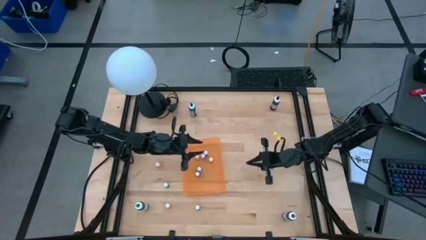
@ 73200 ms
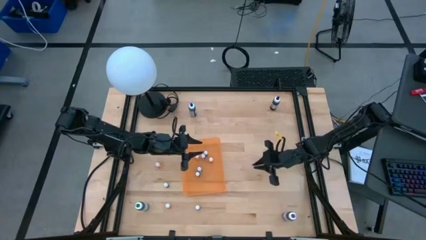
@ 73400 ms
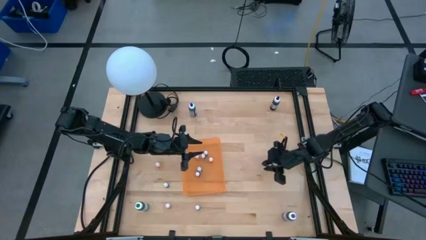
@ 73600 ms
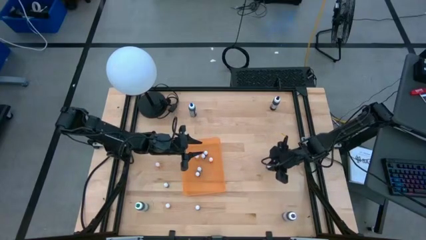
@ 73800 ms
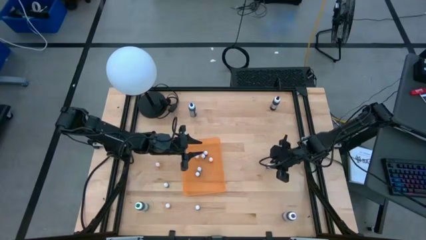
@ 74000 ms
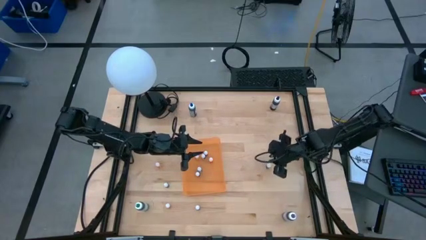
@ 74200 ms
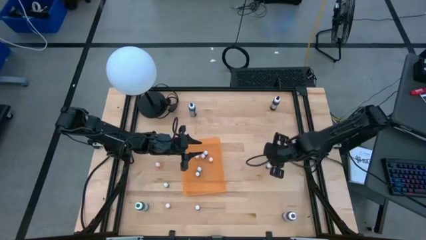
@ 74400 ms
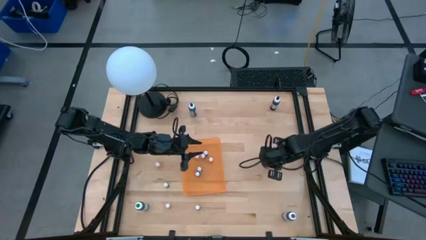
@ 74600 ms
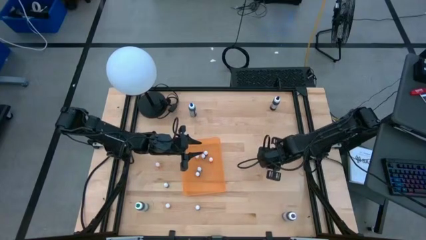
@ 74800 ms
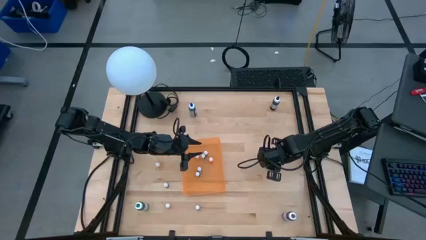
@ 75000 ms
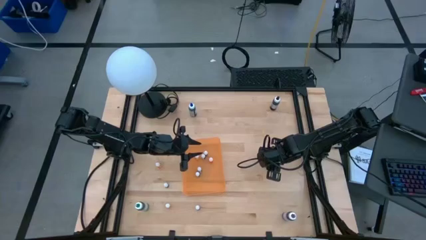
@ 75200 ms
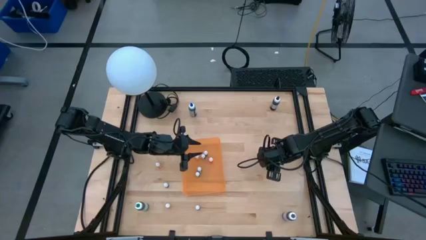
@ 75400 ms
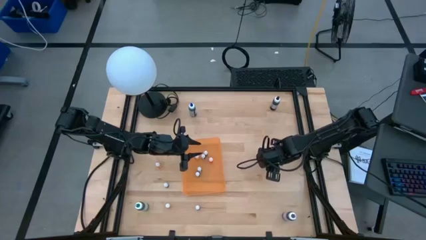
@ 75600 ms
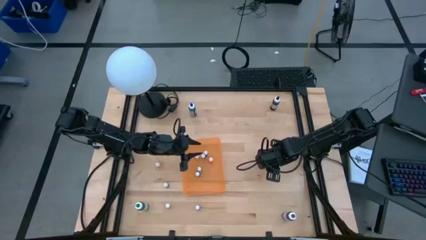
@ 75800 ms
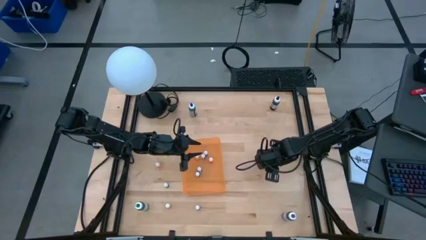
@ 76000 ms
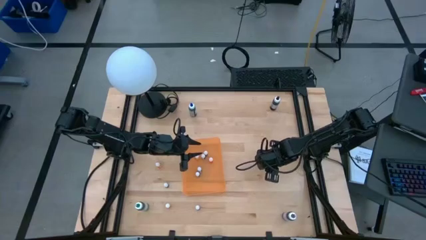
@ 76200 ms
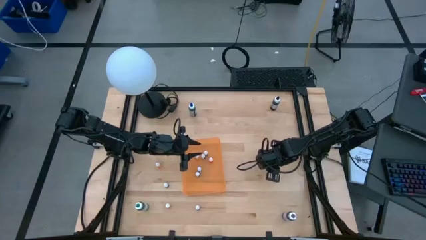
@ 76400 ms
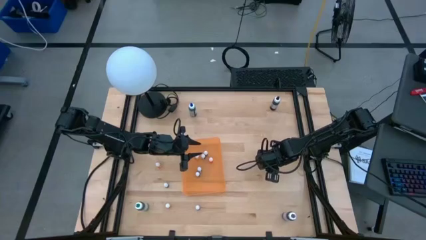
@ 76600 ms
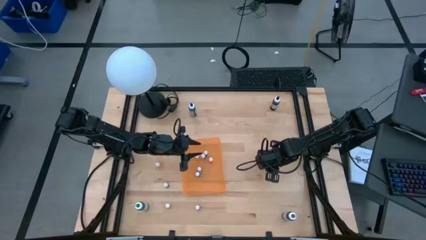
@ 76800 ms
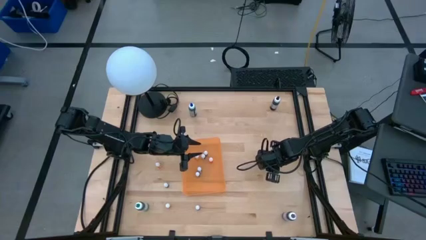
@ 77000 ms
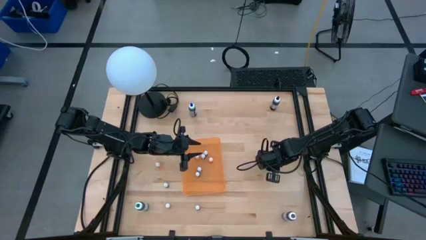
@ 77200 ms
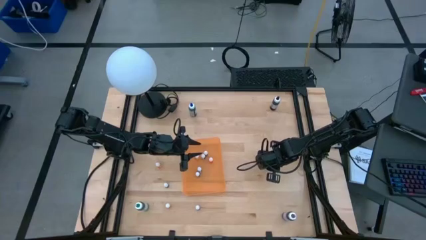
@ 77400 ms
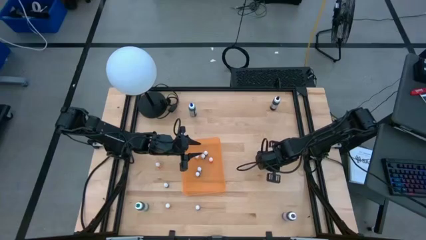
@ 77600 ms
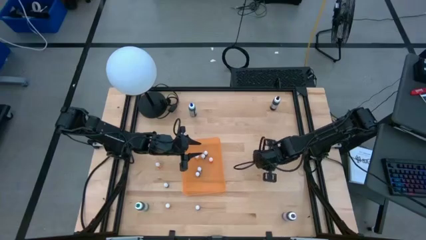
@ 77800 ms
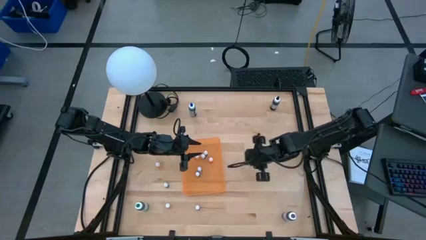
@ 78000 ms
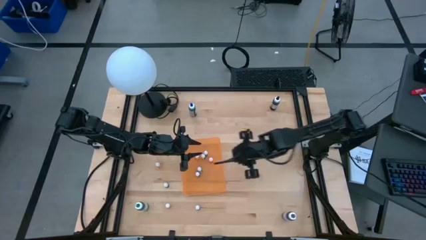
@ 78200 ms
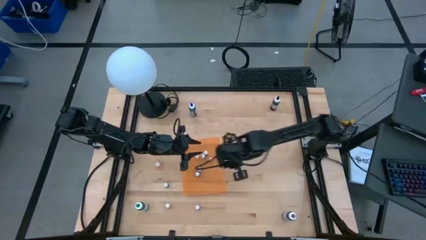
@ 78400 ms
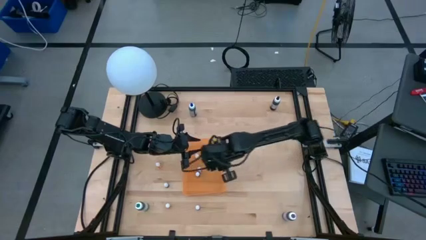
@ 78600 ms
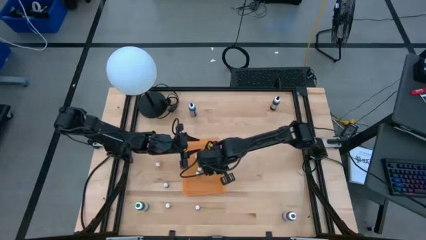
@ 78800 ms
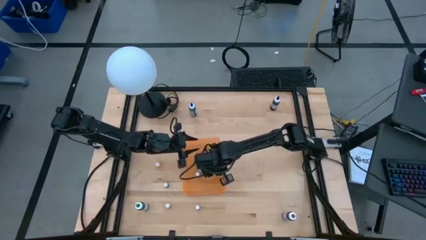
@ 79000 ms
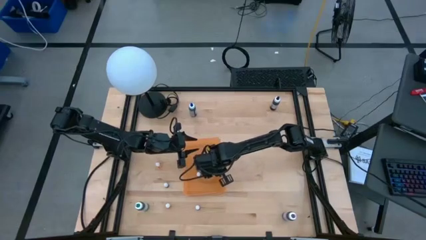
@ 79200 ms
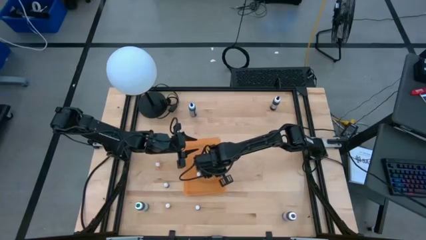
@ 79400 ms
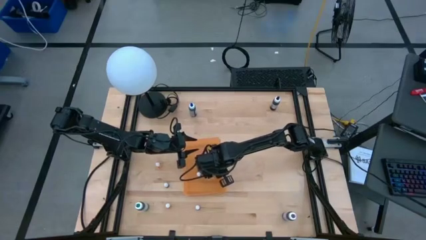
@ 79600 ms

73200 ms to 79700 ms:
Task: Pick & Place food coloring
Put the small dark blue food coloring bottle into the orange bin

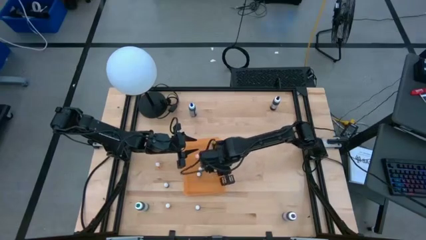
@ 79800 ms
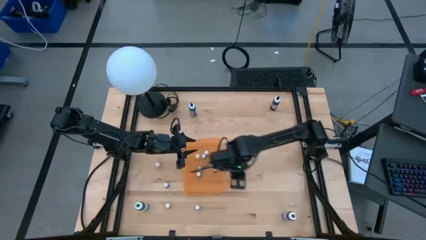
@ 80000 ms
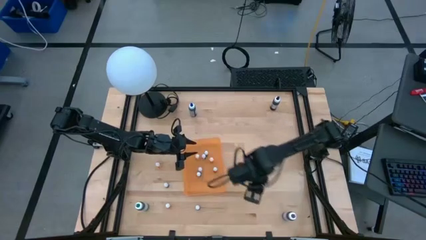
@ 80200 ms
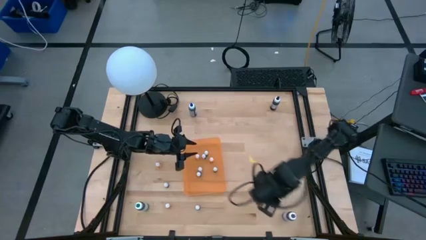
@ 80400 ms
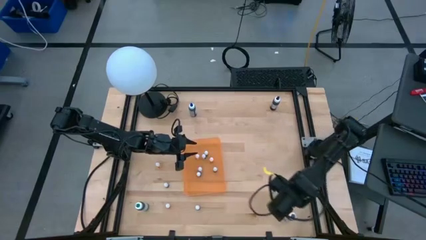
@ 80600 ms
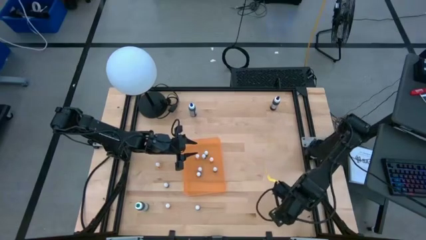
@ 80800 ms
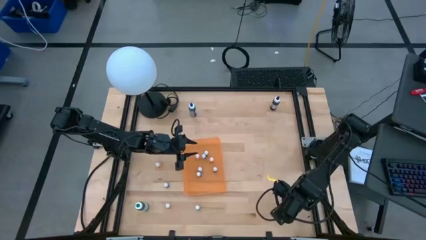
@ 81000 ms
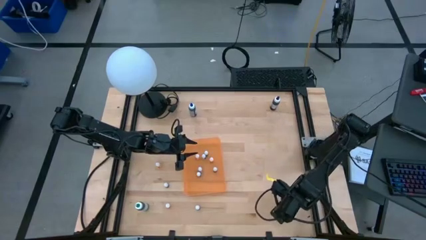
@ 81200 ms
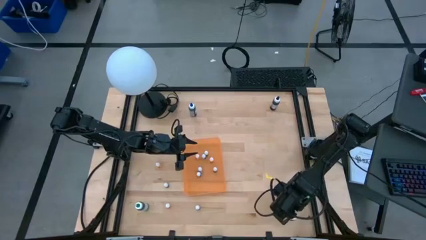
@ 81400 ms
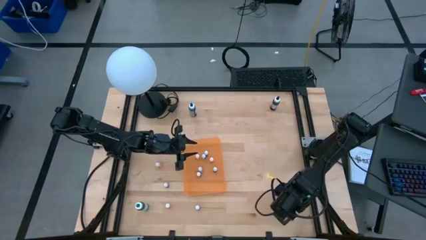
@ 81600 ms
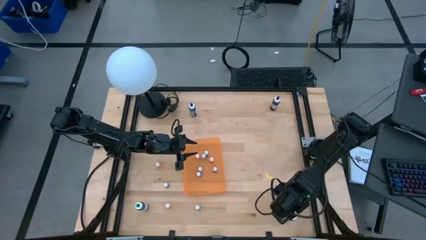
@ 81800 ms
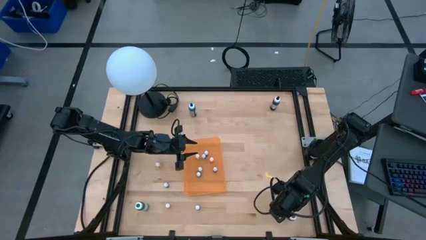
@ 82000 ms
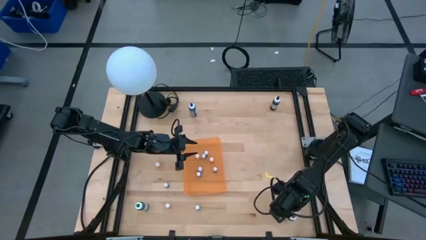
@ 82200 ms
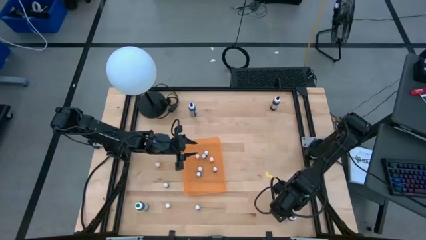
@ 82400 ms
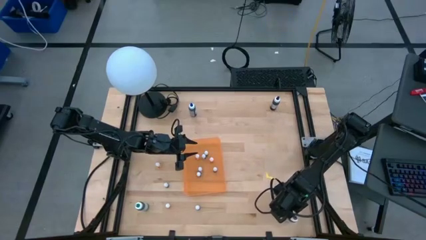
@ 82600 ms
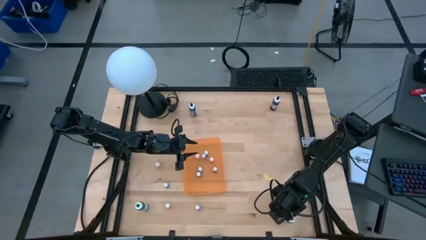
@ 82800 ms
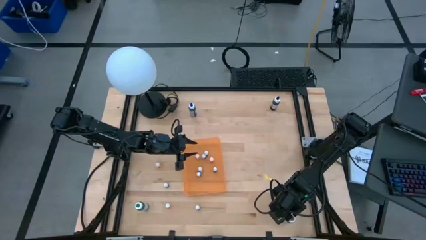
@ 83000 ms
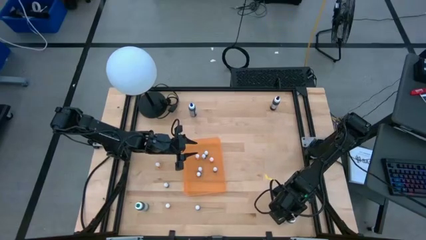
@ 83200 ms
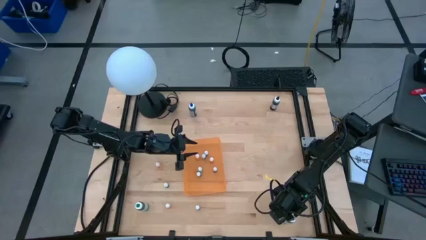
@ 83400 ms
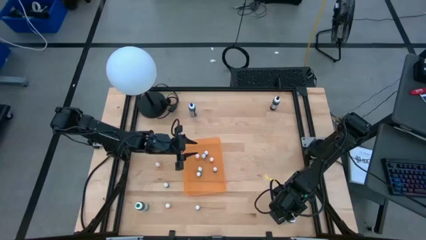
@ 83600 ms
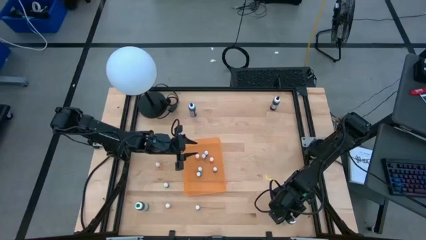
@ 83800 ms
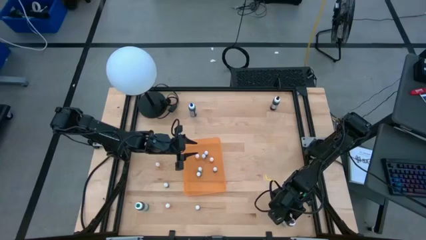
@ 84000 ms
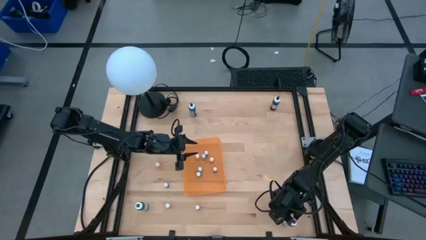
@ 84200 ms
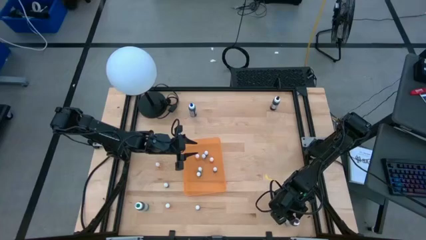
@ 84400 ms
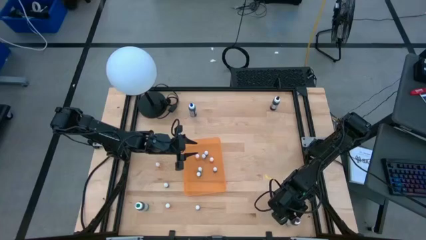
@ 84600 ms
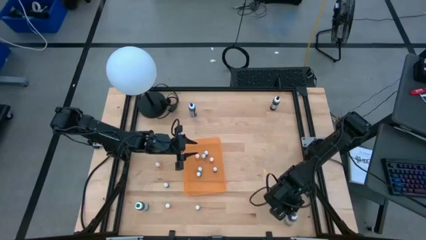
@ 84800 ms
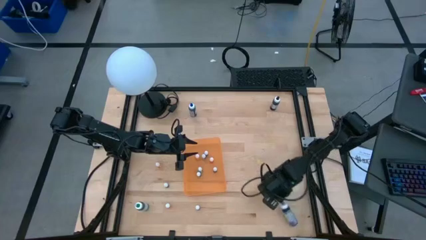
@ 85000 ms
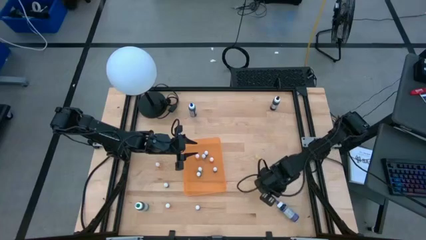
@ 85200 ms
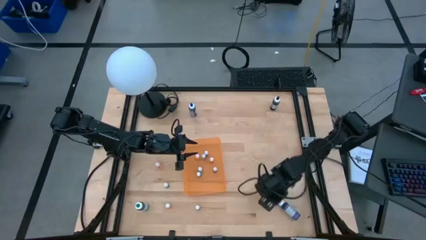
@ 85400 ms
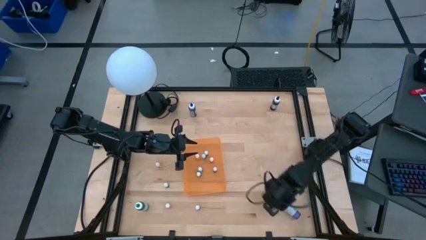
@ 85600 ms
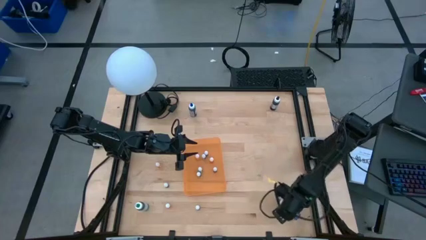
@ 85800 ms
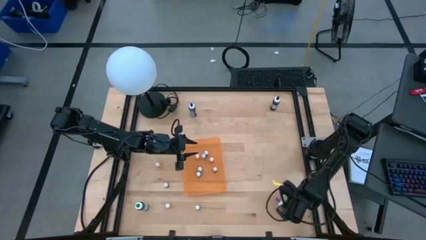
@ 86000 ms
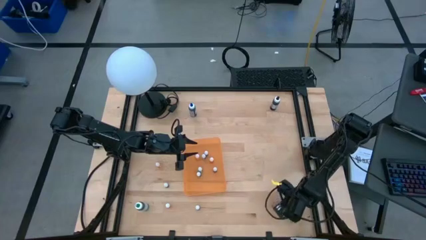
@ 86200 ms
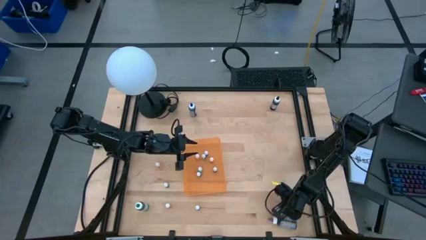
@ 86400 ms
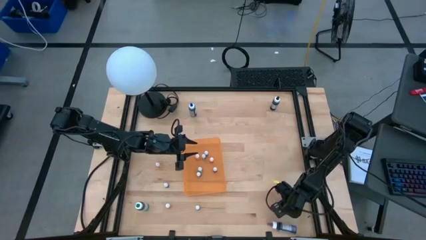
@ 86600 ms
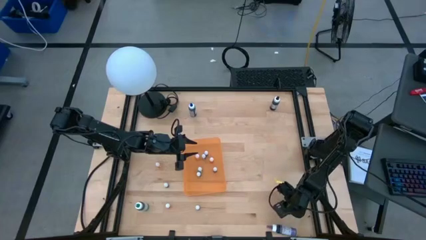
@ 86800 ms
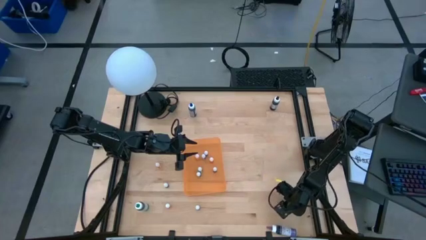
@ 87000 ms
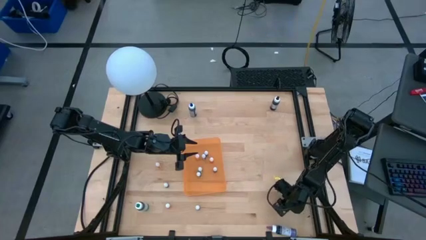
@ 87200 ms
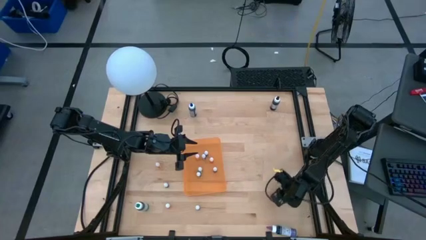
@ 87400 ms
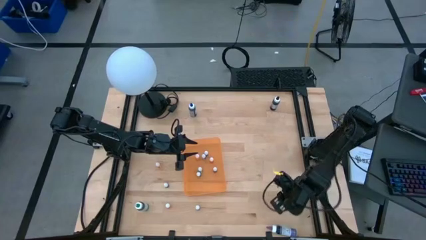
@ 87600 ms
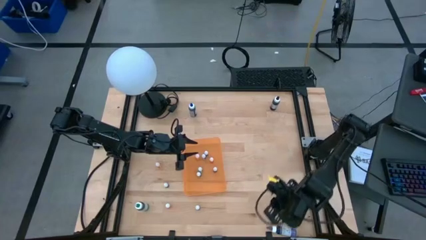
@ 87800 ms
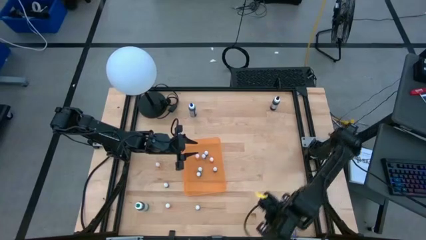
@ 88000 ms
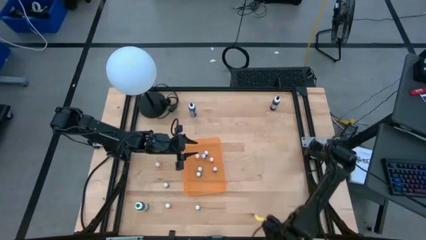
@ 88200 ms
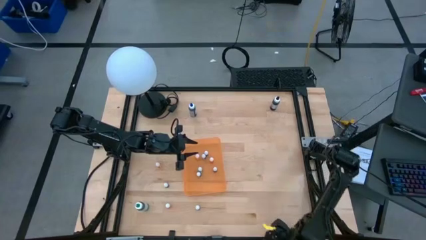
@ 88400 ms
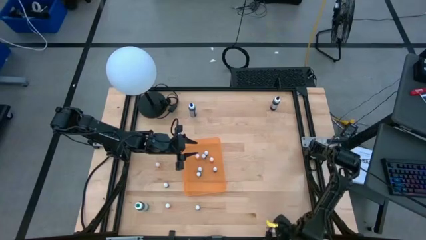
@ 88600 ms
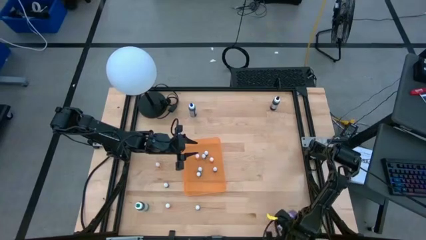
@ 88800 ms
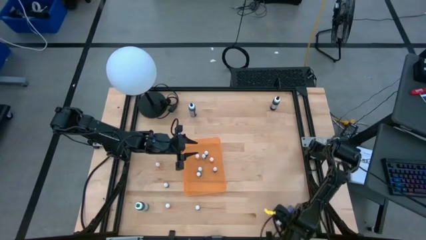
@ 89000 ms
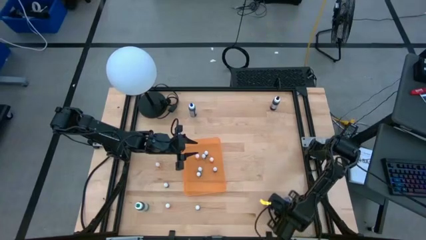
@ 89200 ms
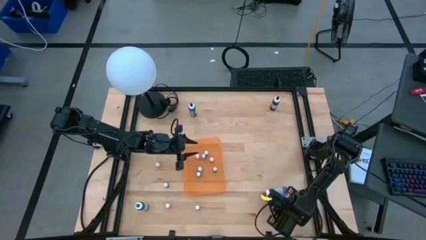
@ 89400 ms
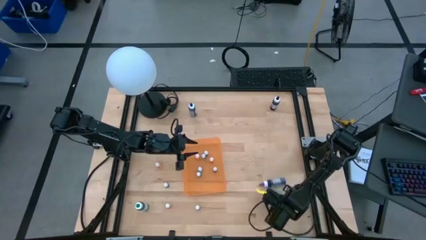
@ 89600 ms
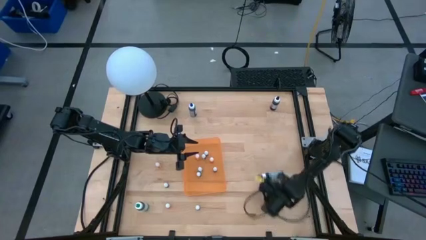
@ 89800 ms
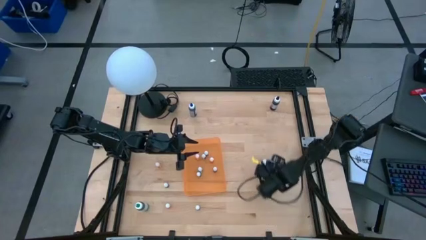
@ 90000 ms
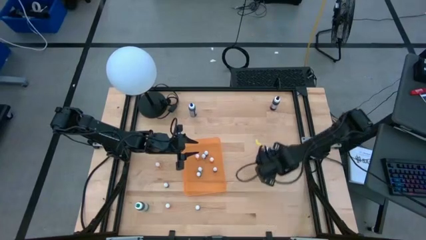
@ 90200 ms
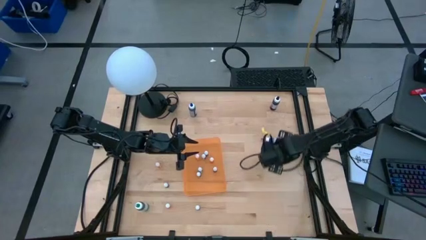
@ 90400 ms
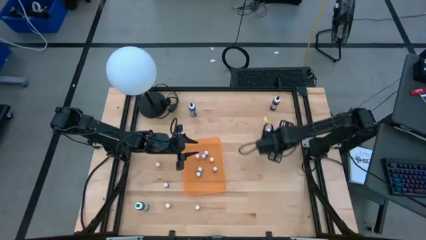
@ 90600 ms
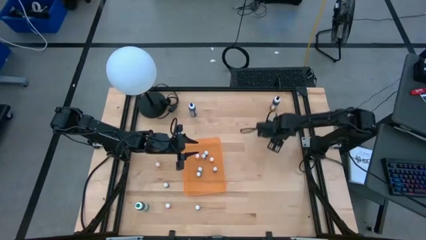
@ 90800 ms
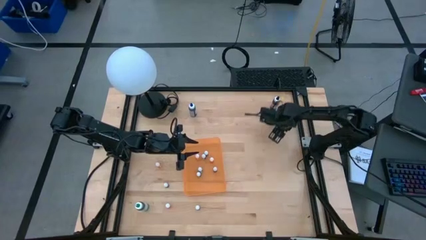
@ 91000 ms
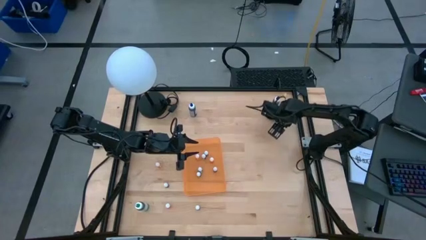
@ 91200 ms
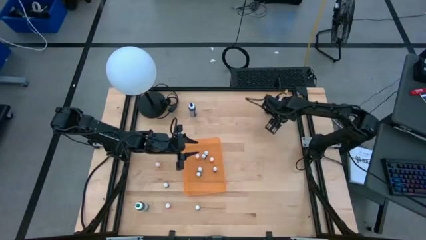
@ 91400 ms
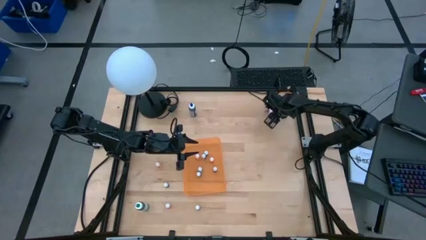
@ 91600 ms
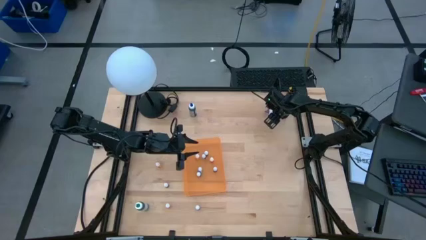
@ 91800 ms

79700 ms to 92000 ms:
Put the large black food coloring bottle into the orange bin
